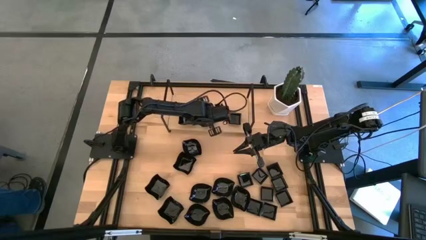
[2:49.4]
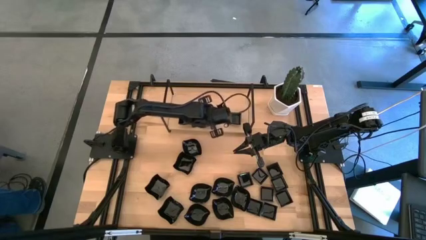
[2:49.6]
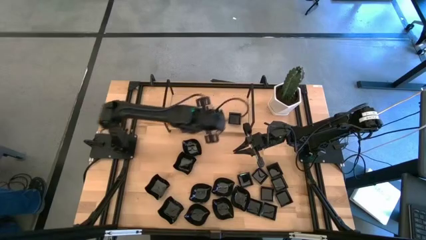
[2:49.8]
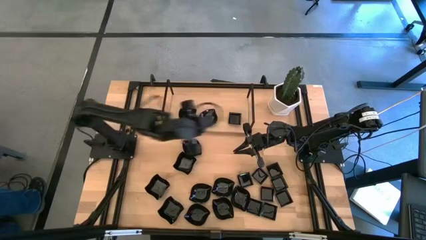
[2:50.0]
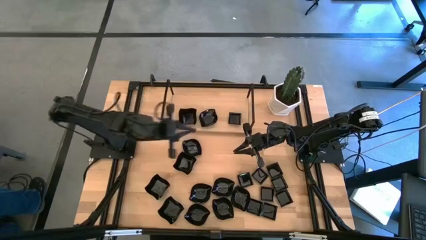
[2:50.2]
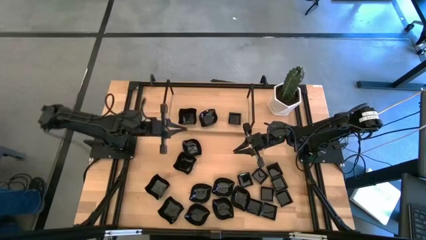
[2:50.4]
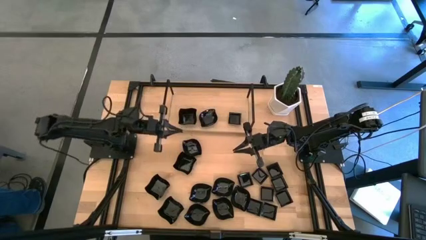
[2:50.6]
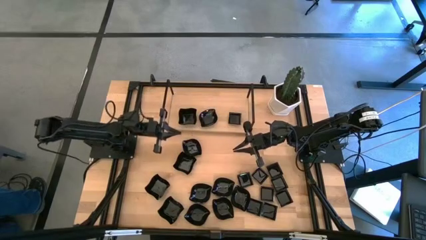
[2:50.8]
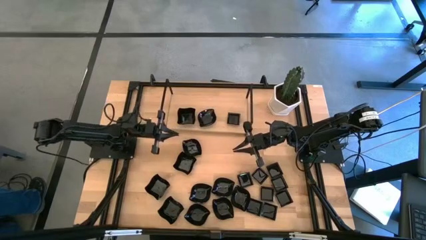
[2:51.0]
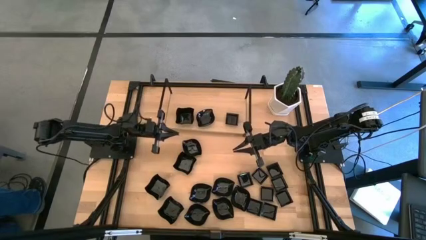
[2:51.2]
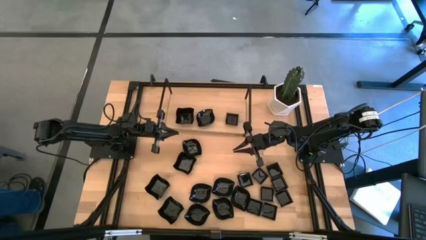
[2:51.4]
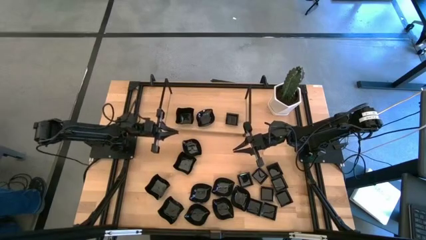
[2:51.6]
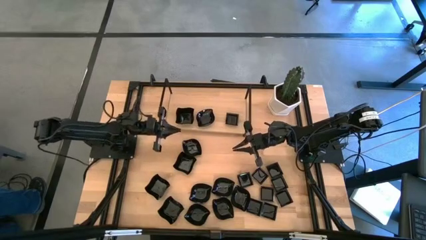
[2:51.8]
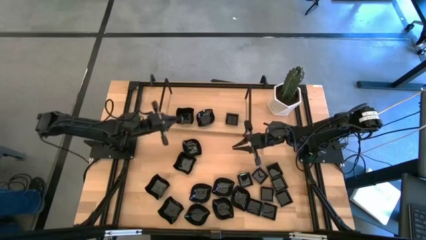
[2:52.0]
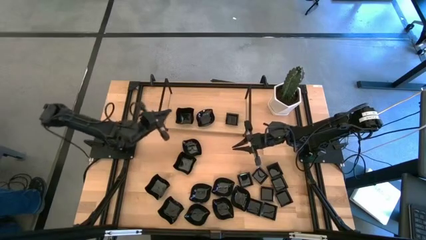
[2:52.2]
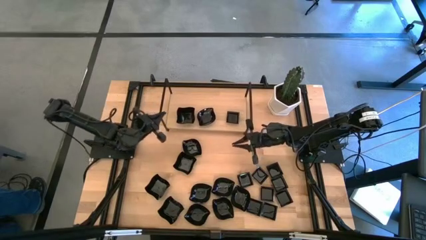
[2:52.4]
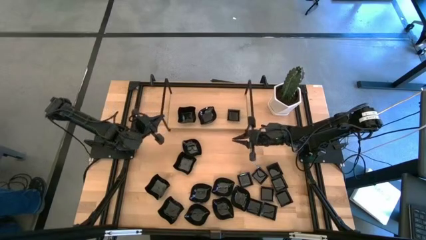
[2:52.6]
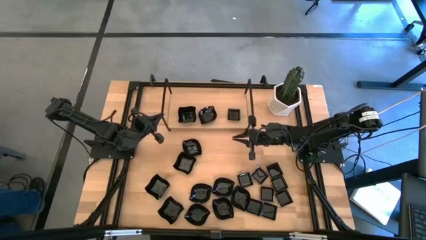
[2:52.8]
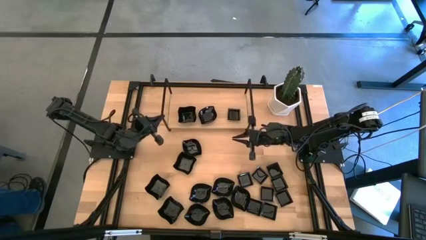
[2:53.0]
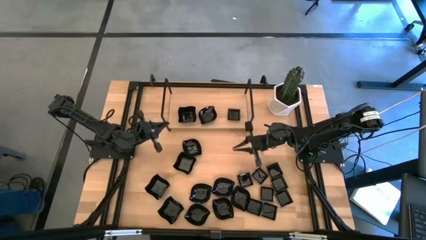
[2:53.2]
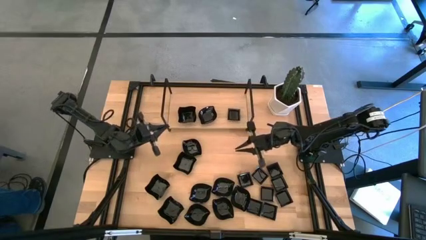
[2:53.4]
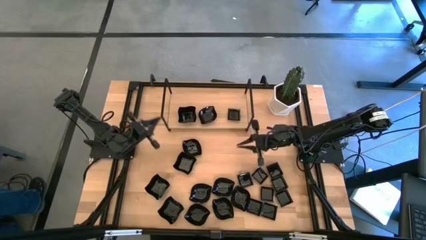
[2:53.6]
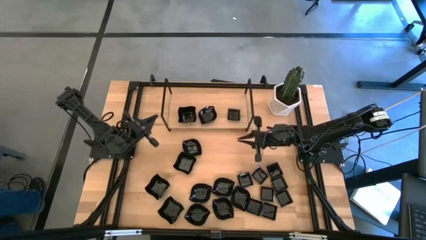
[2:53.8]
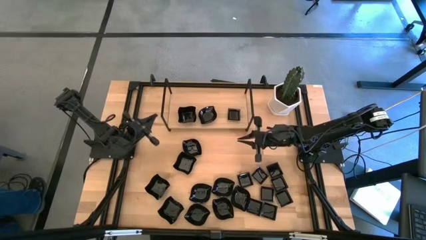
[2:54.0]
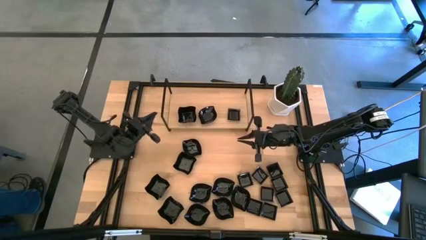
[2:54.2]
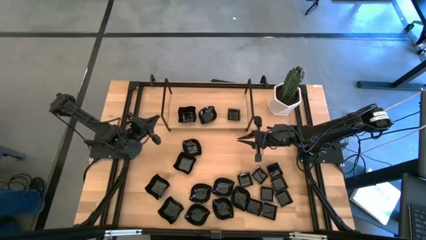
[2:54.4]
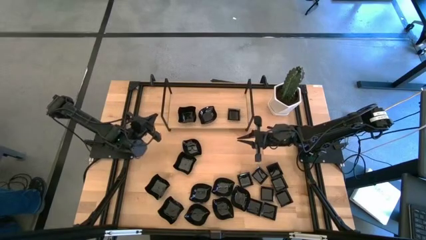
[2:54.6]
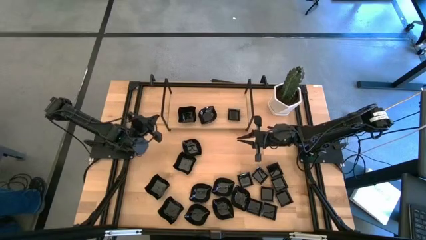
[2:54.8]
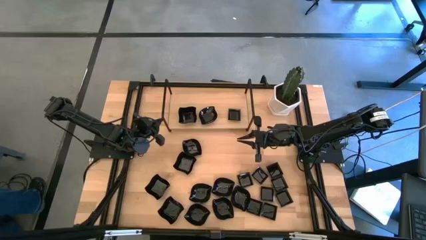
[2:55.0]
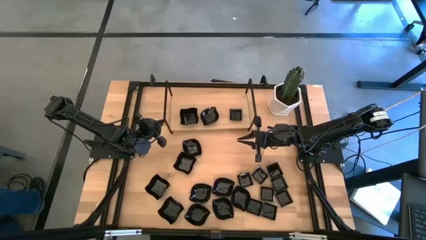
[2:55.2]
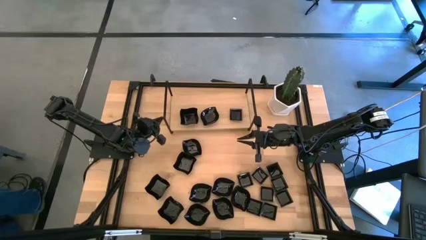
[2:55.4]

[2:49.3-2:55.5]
Task: Pick & Place Mini shaped plates
Adjust the shelf on the table

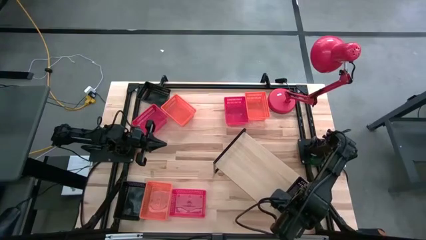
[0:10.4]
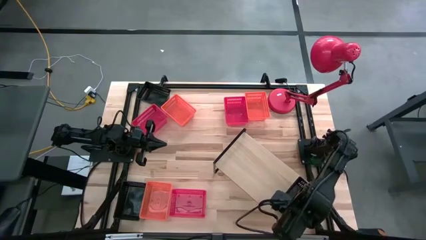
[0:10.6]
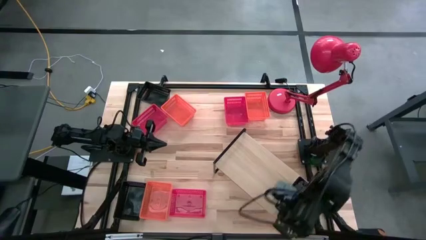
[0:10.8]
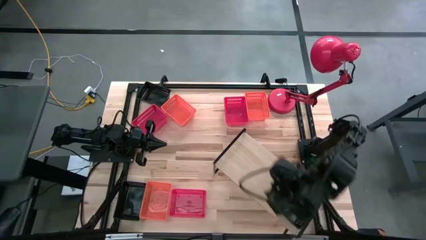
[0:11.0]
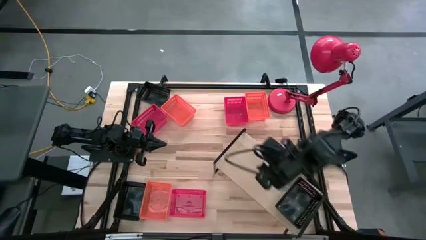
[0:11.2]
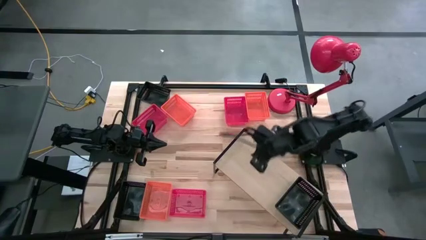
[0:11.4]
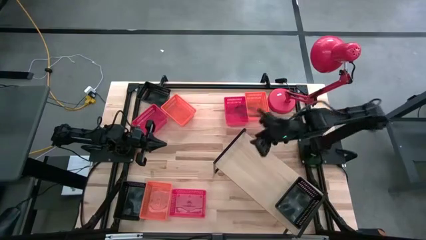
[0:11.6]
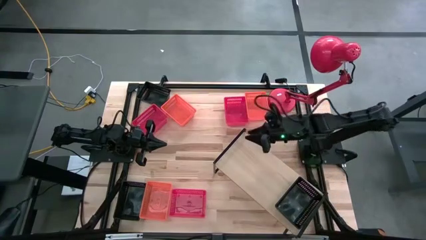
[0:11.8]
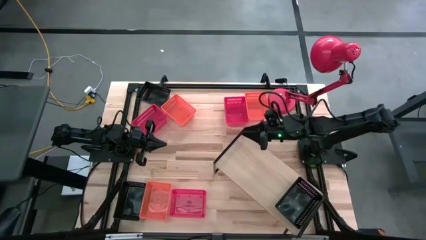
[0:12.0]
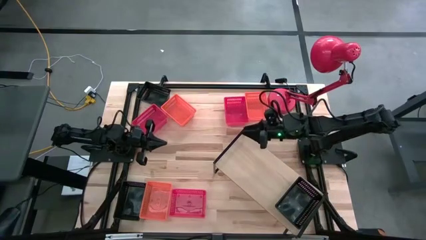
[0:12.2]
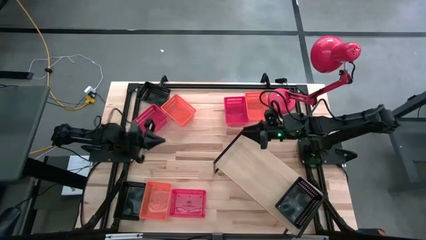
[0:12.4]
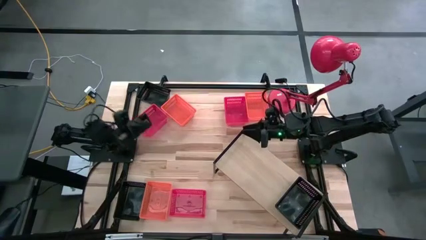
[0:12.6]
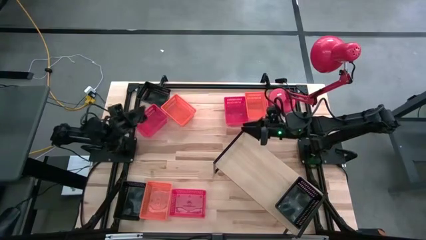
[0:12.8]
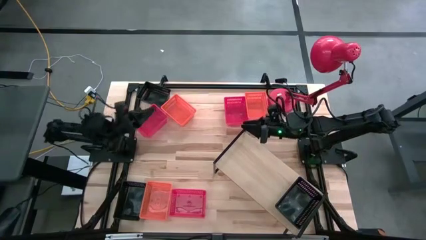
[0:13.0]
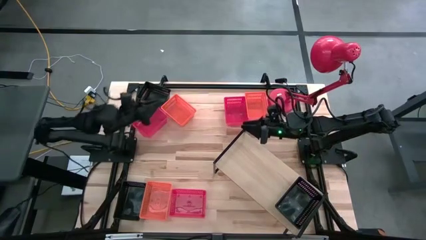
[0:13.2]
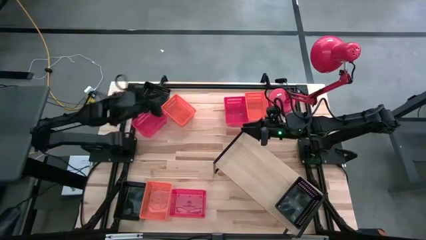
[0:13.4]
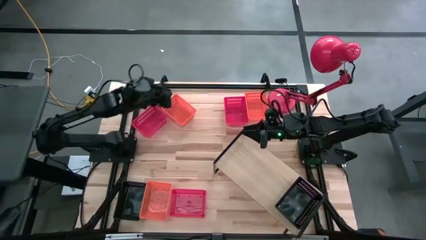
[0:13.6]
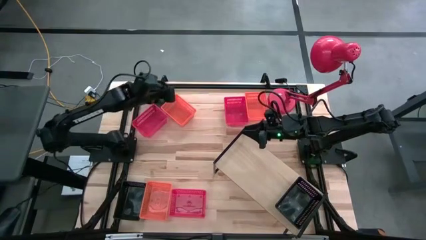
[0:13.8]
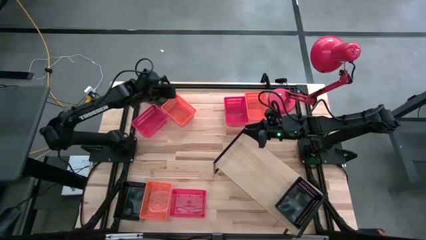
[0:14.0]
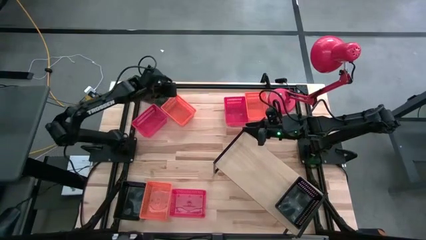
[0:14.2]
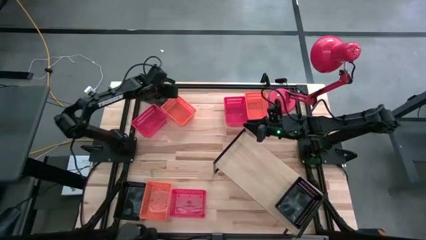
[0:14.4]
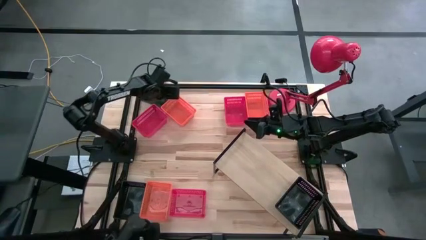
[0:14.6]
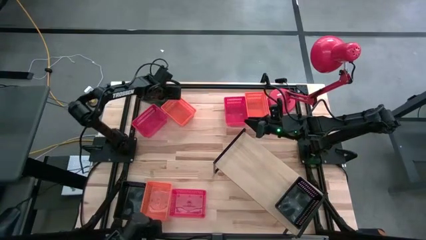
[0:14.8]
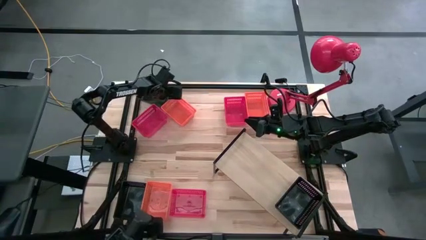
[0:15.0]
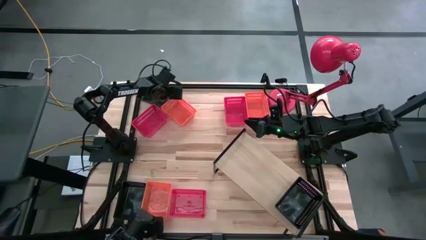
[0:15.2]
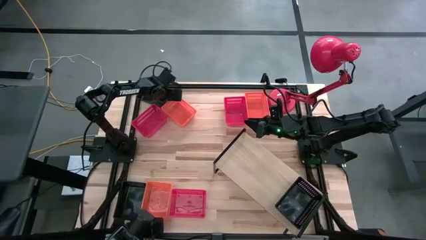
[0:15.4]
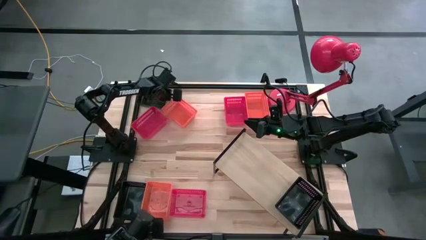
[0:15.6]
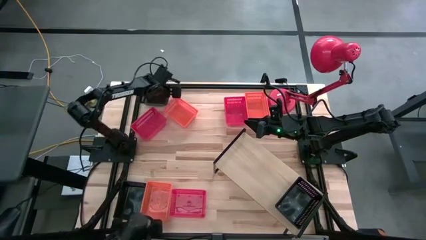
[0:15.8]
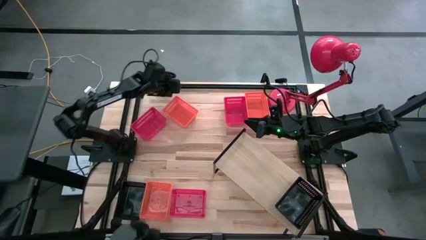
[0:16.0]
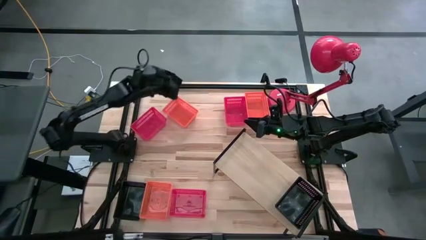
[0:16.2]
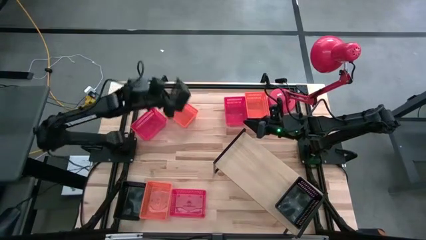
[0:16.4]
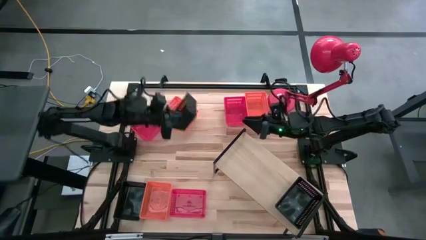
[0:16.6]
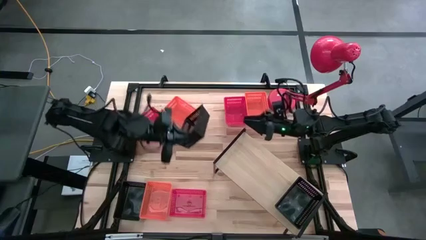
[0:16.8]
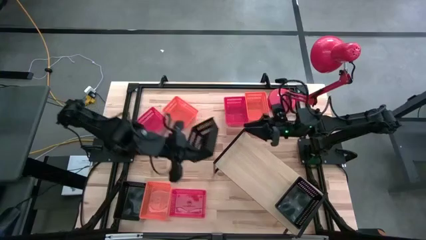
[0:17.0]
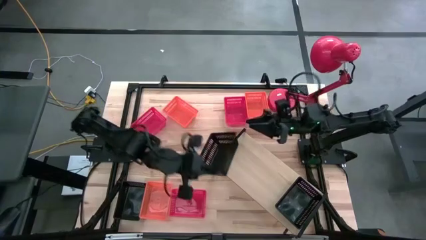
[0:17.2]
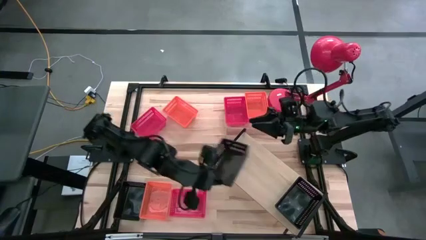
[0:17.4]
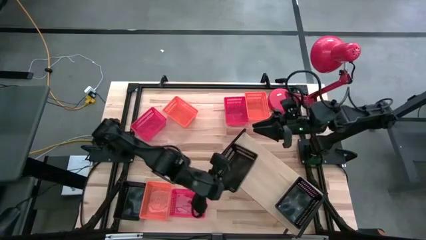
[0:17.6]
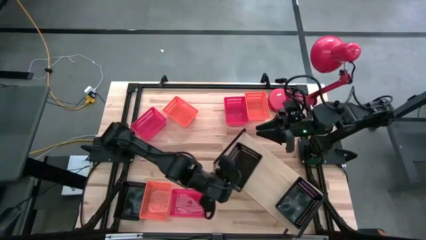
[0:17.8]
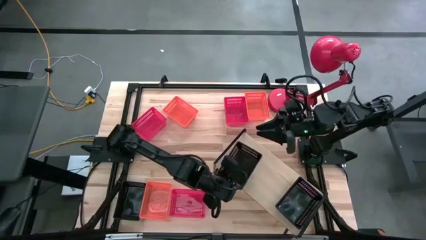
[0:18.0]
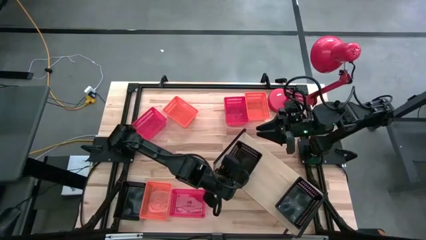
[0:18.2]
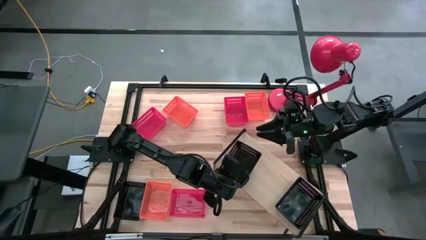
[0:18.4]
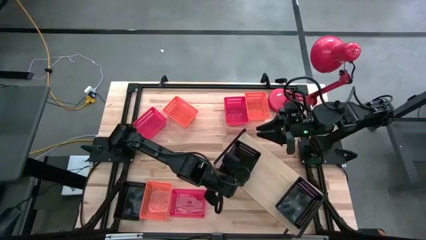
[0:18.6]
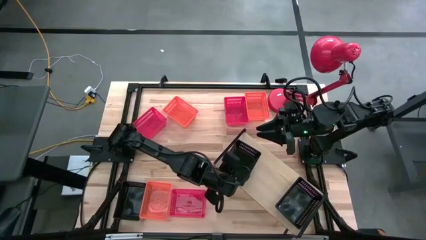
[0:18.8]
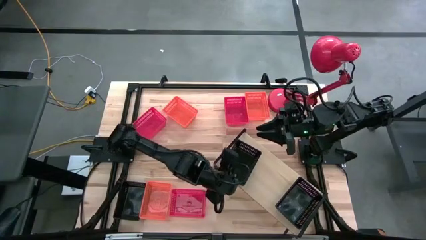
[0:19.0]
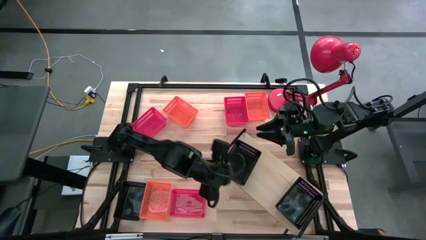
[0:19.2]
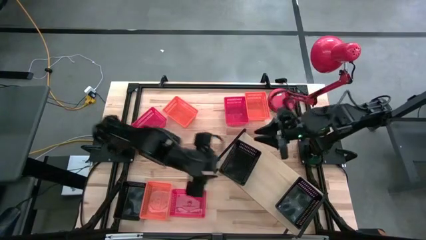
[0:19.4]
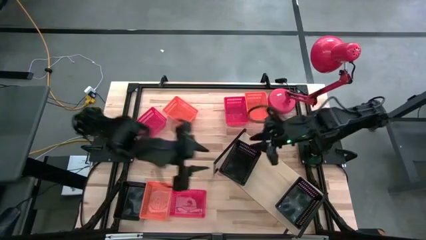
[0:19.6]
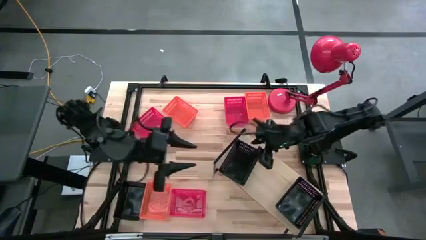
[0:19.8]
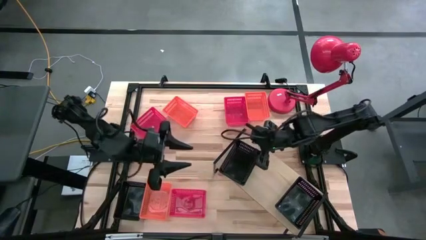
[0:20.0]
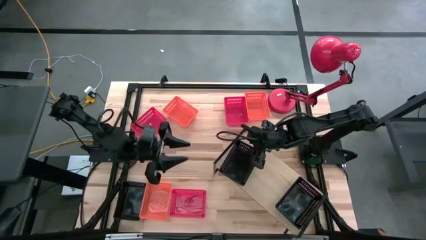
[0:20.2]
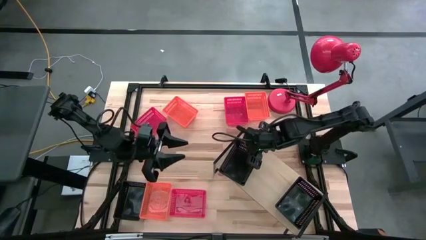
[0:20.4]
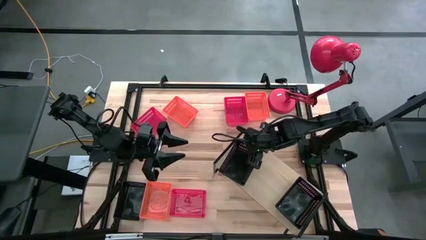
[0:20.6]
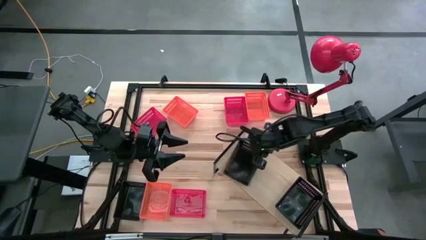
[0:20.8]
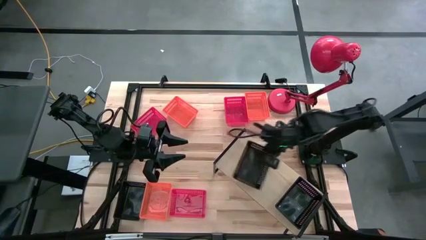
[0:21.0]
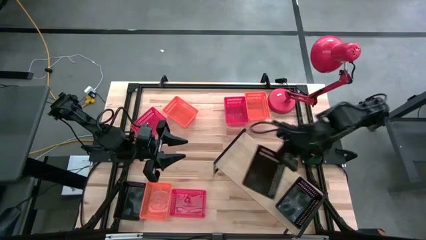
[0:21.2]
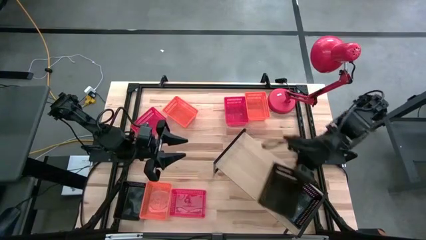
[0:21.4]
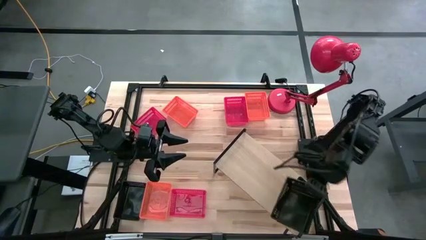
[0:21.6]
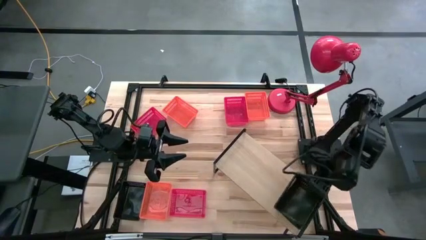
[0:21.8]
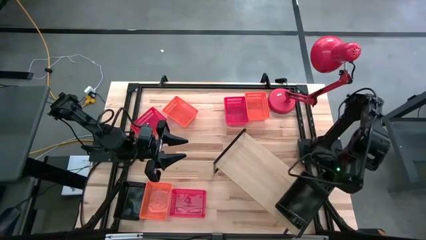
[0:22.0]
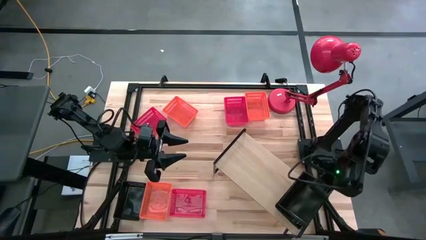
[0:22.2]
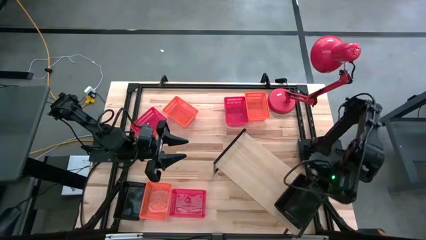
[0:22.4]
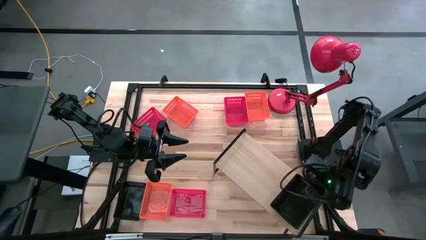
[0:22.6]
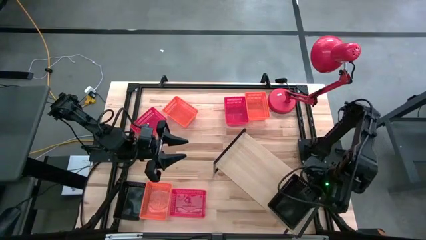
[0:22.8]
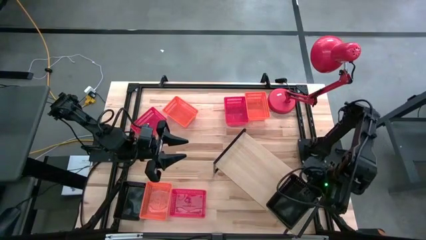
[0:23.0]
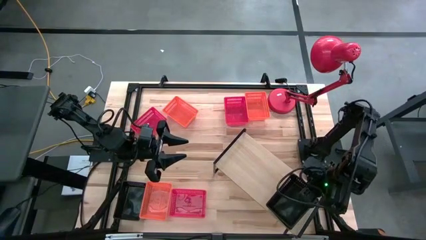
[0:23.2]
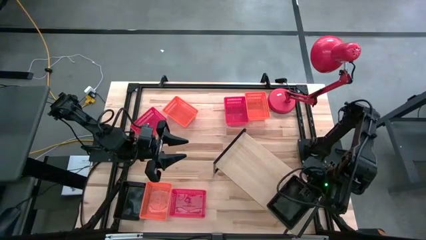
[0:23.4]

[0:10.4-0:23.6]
Task: Stack baskets on shelf by color
Stack the top black bin on the black bin on the shelf
